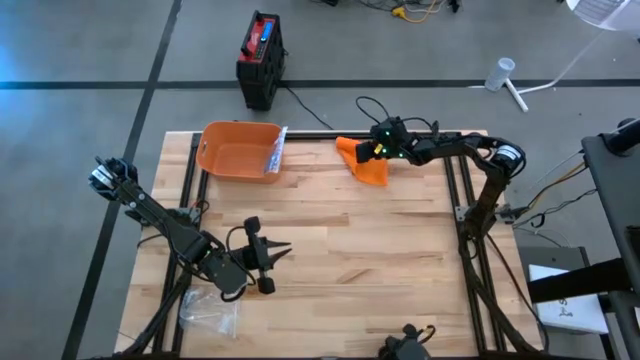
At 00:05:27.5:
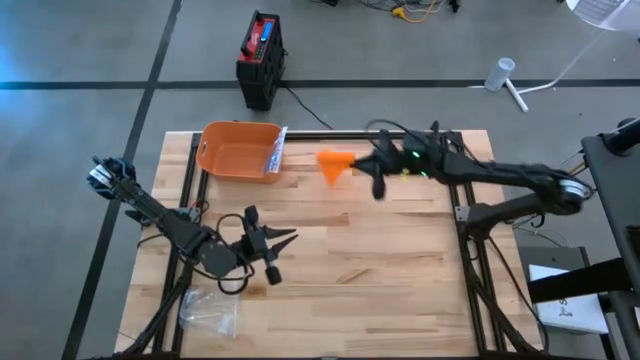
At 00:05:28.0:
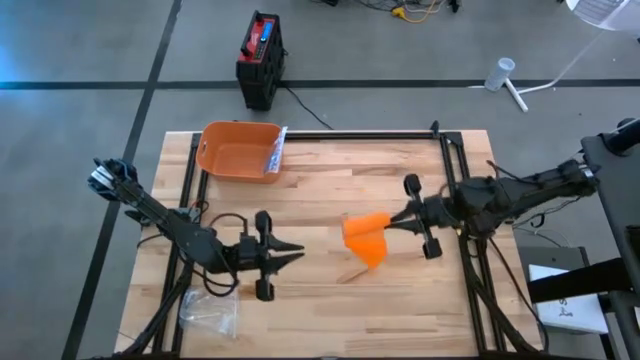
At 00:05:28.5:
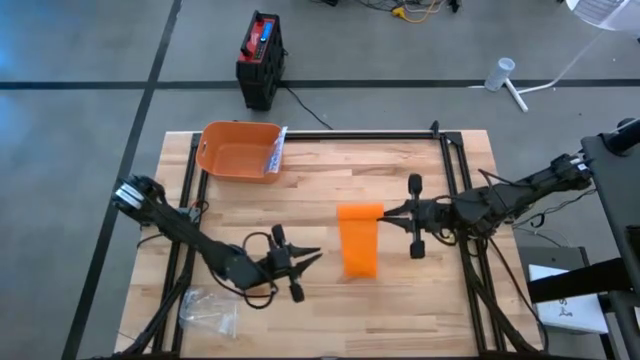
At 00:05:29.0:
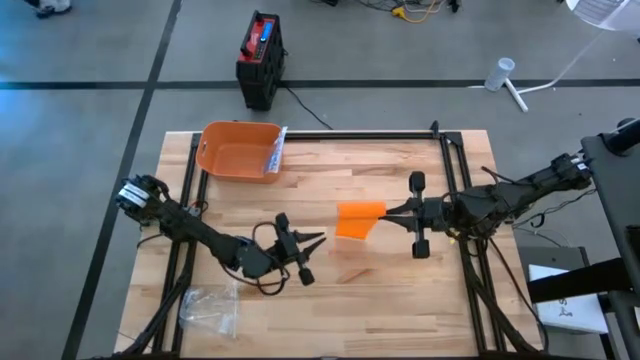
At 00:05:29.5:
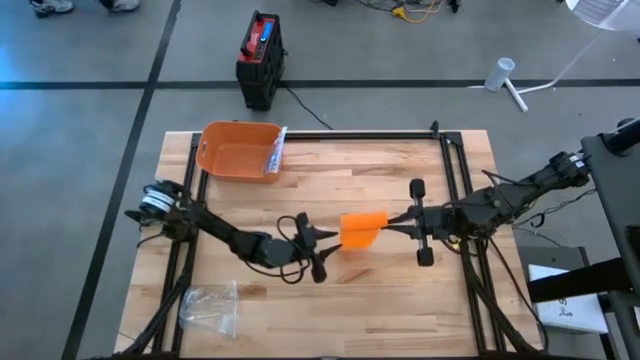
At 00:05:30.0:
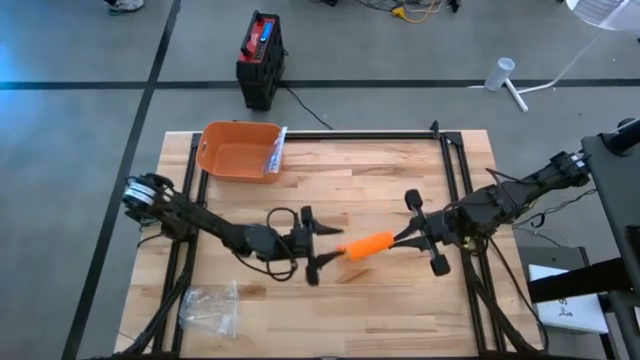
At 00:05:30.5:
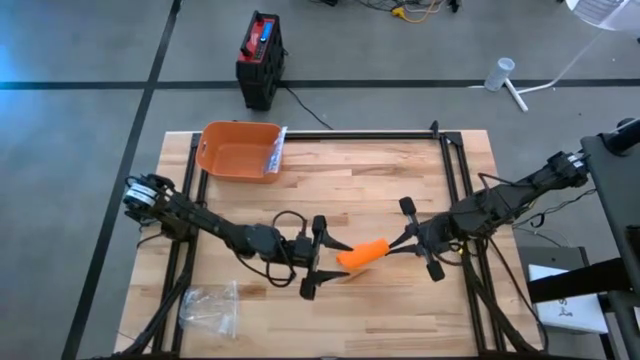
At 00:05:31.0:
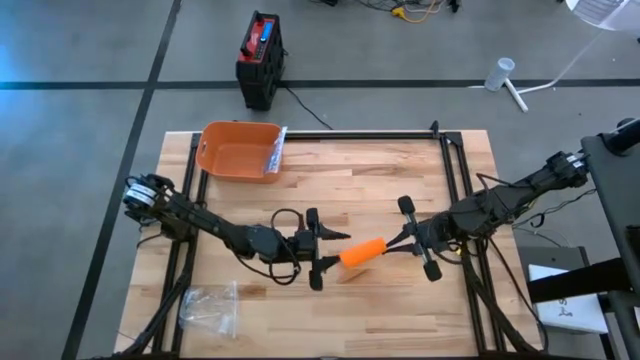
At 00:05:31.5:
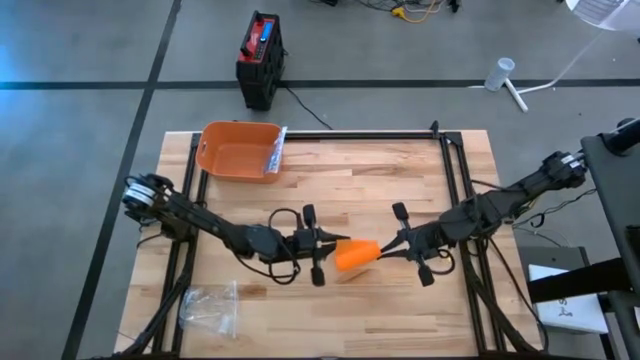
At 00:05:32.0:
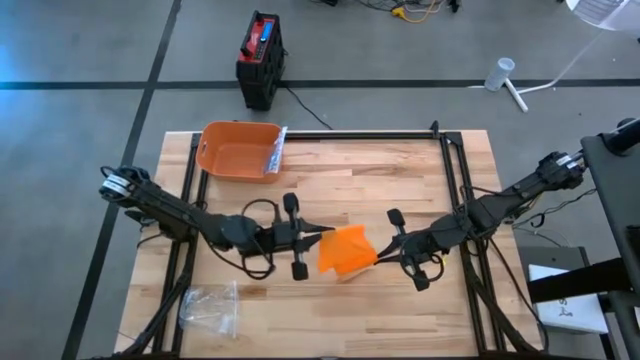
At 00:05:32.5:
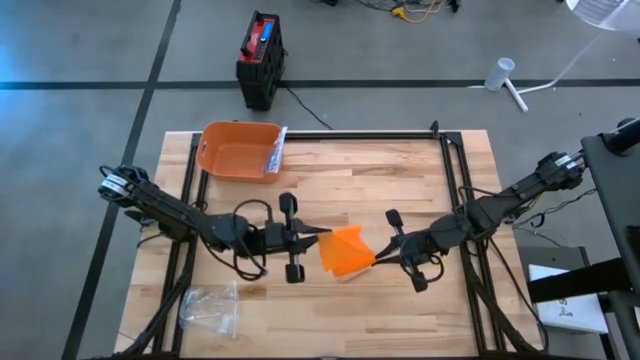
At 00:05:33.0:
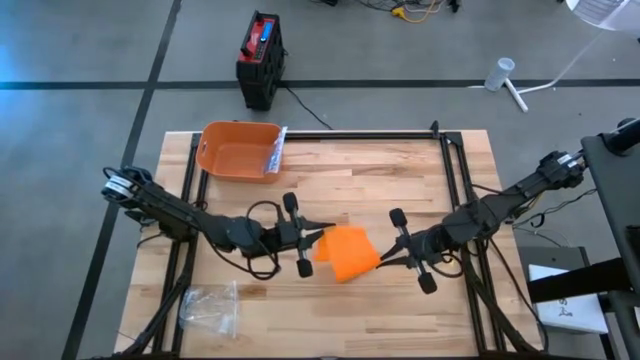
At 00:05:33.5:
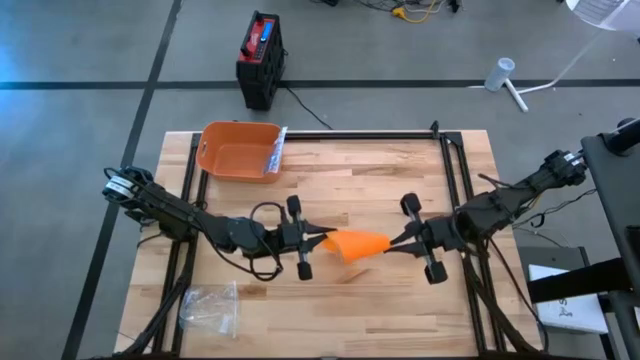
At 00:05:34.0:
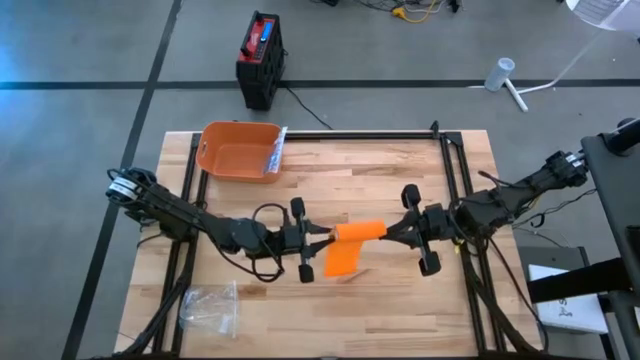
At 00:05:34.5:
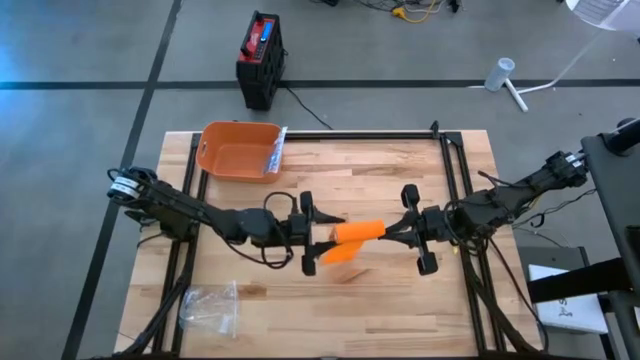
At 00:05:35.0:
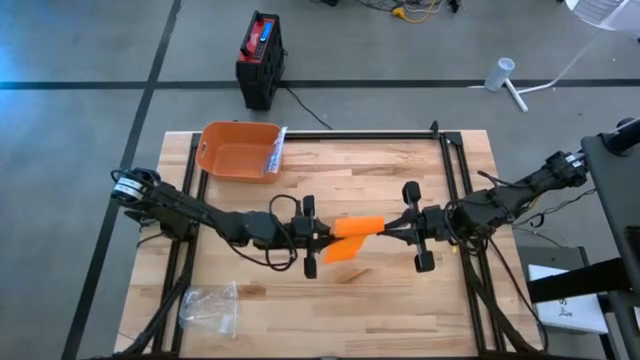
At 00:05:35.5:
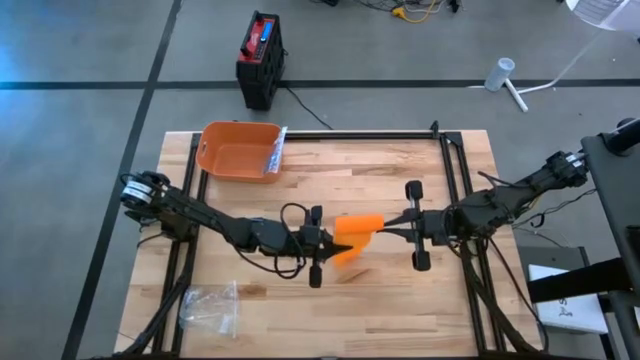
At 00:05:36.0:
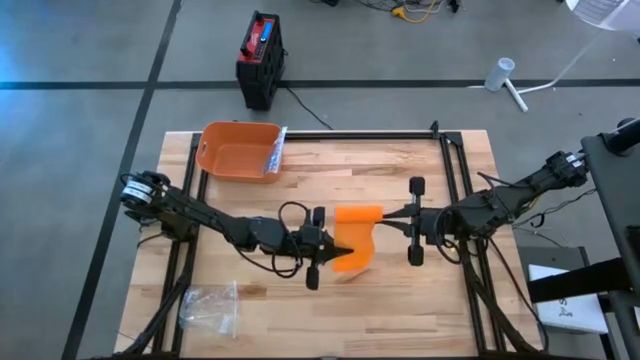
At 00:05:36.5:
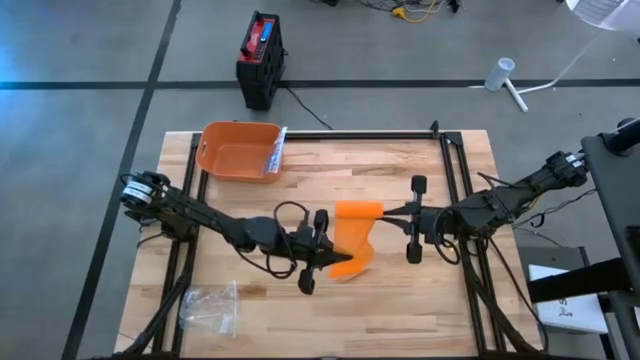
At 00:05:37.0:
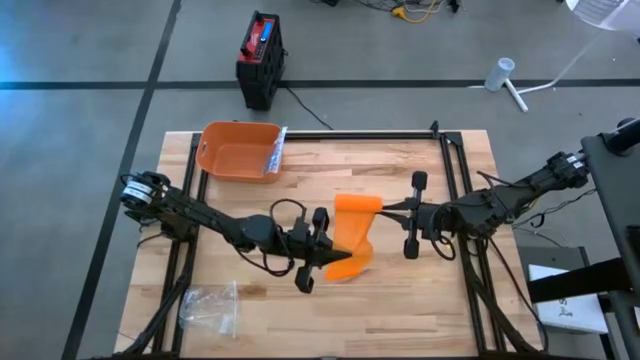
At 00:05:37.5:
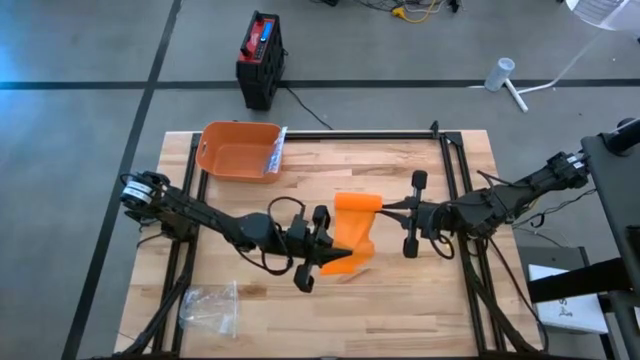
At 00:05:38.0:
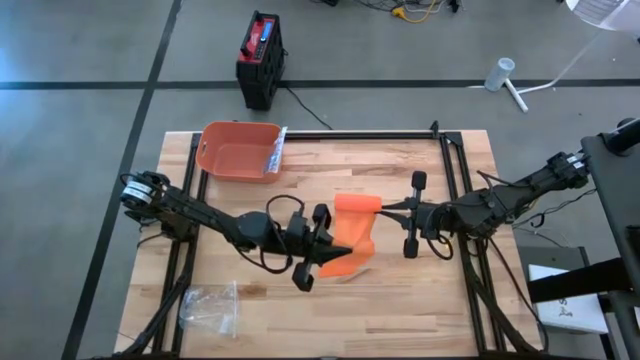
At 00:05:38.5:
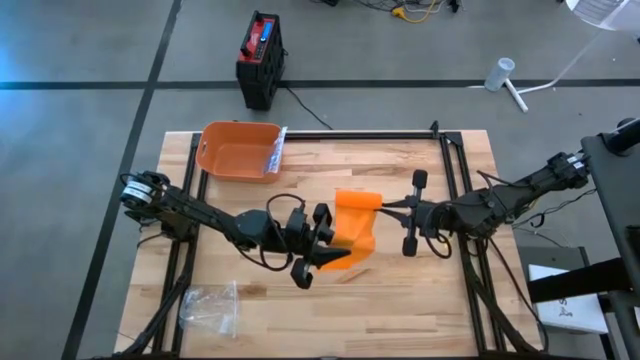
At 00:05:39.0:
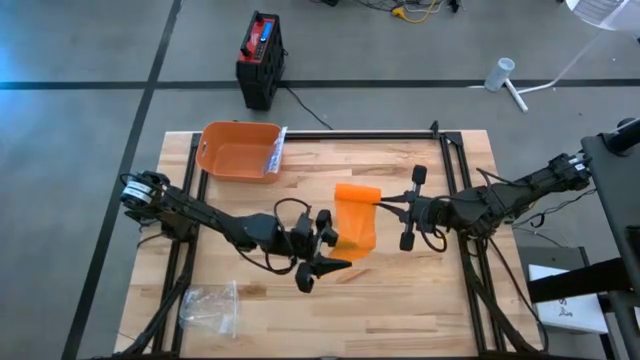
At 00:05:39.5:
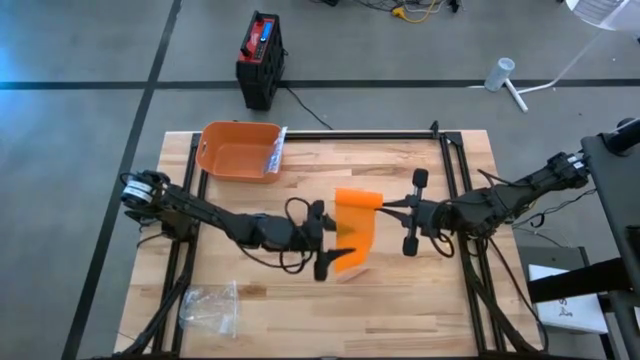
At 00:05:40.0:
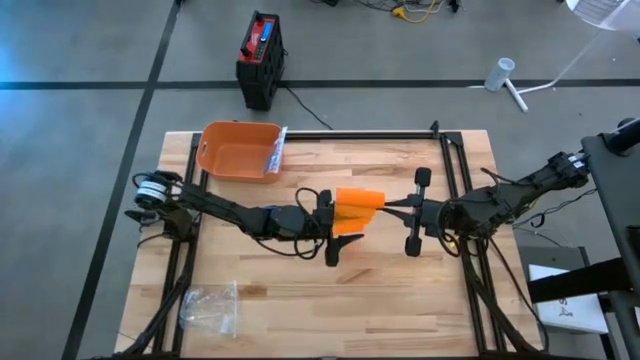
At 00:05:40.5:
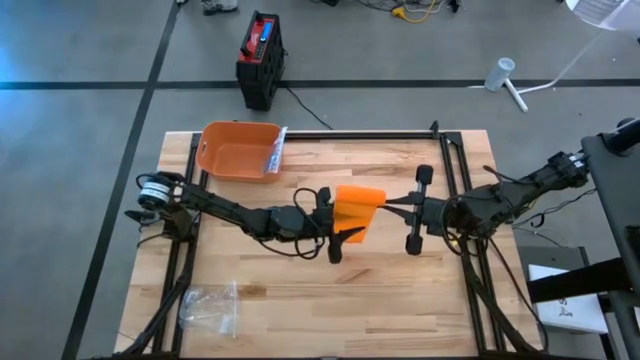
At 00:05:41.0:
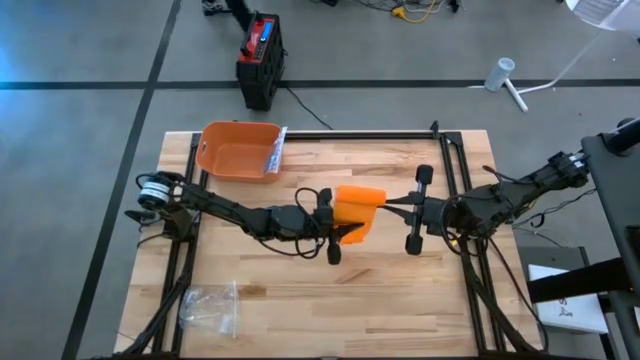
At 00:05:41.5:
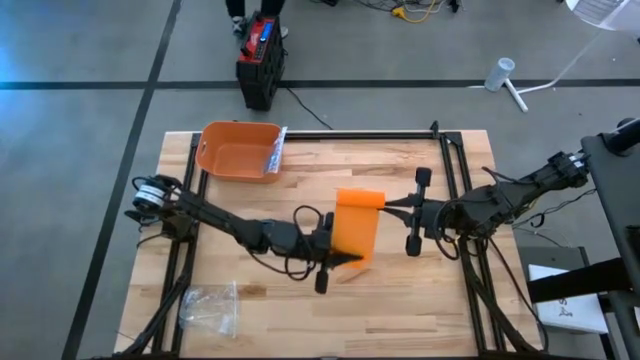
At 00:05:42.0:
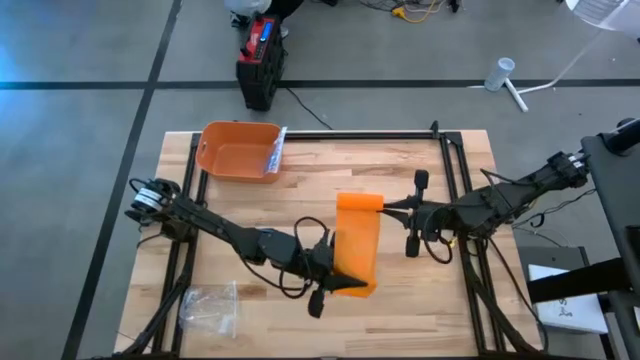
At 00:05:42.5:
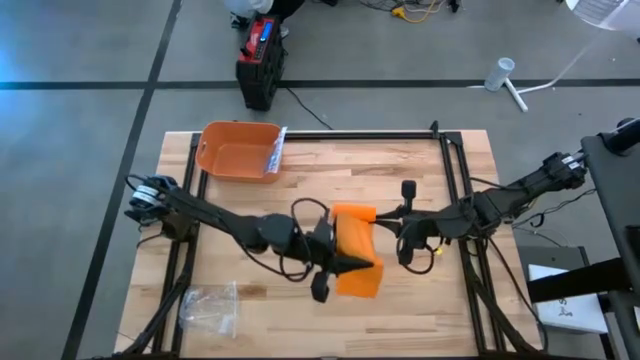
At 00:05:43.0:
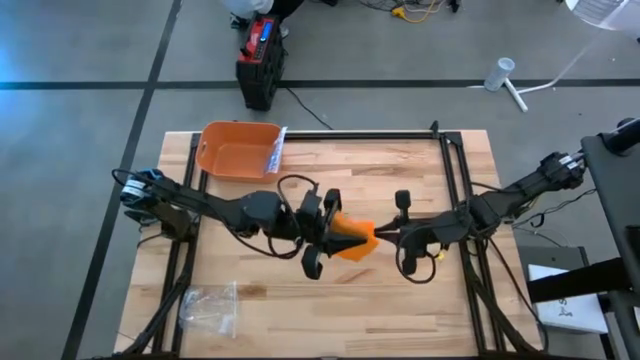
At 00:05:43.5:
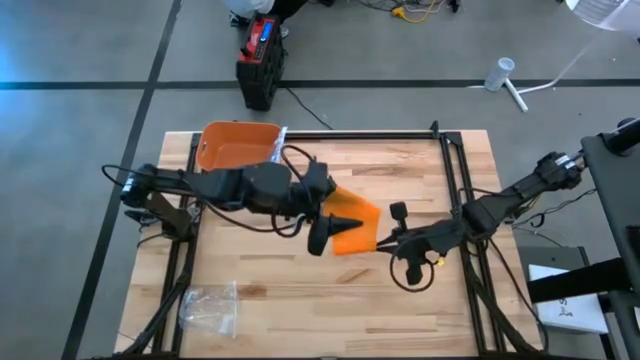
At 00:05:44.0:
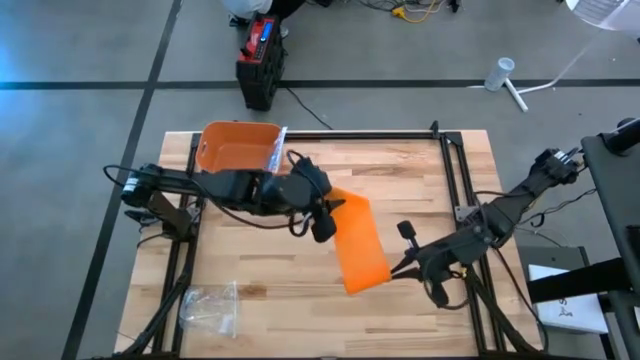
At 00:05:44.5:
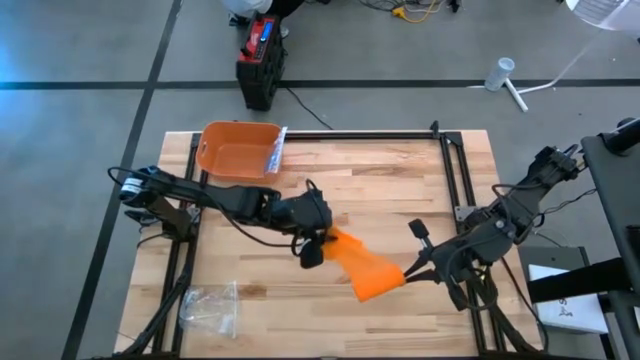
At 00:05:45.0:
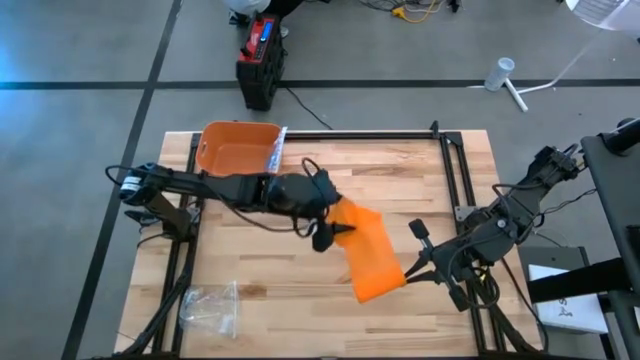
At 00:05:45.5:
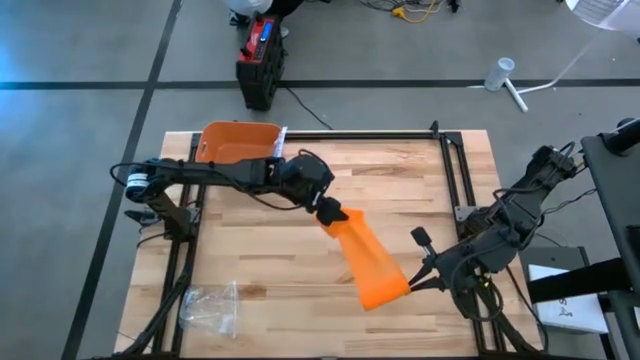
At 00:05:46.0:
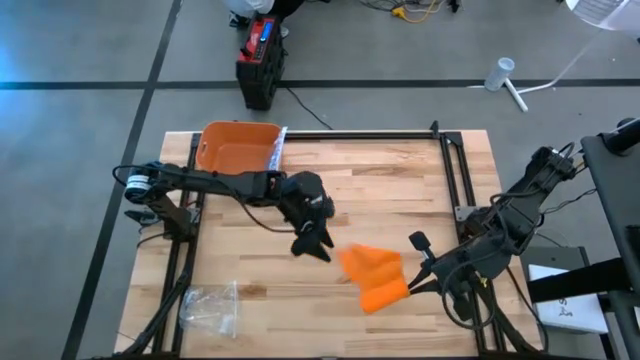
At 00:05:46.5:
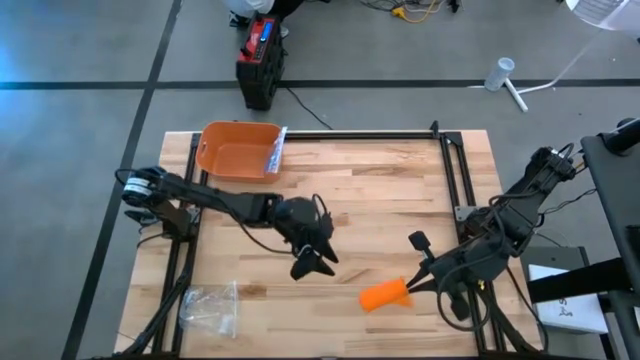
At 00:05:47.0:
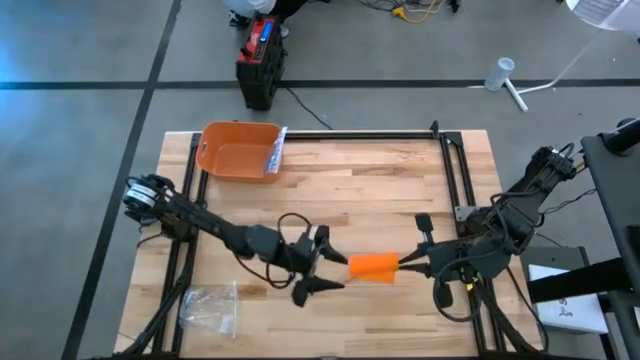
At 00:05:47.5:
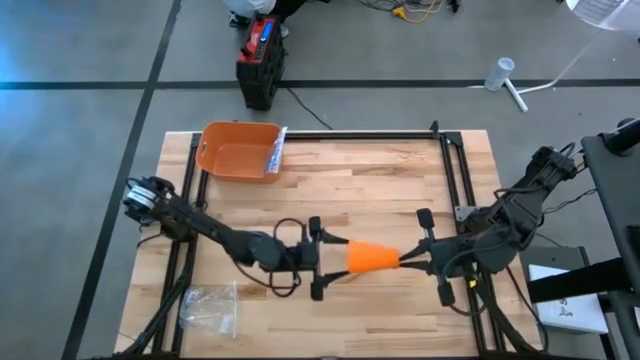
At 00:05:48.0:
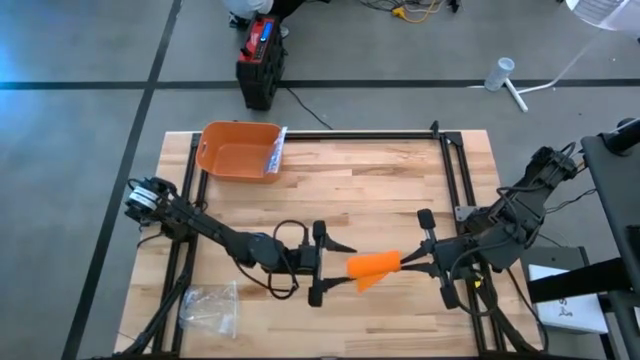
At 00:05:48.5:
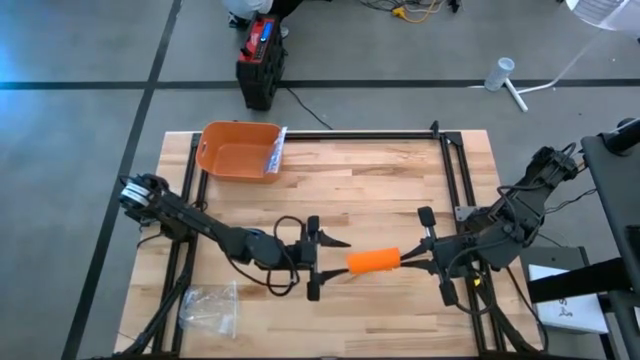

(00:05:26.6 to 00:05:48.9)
Task: Roll bandage
Roll the orange bandage
